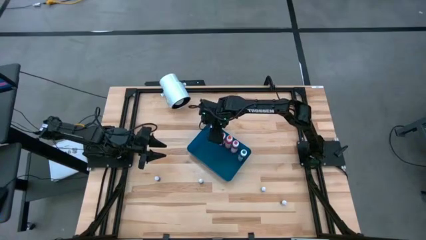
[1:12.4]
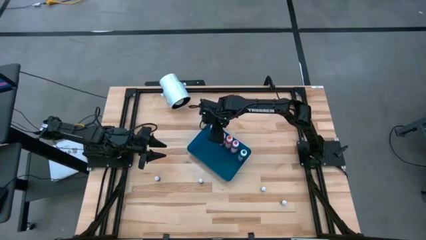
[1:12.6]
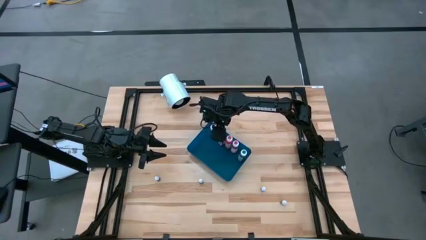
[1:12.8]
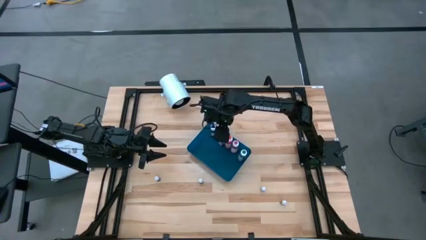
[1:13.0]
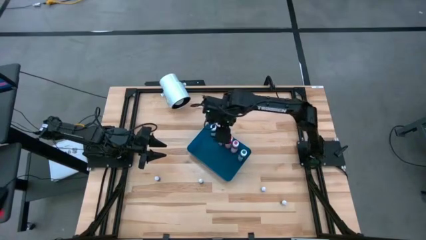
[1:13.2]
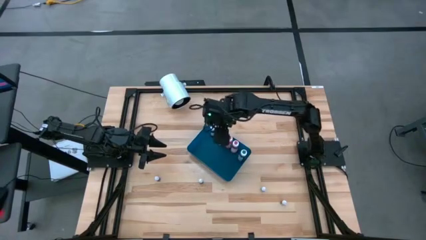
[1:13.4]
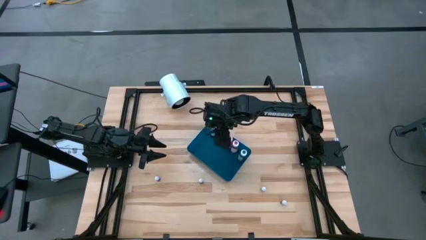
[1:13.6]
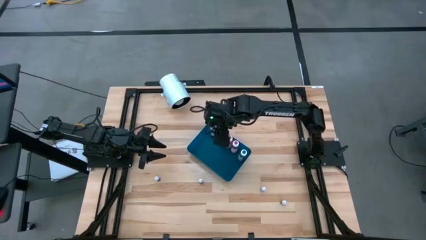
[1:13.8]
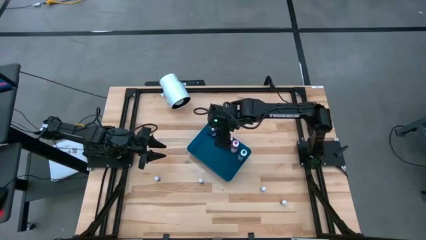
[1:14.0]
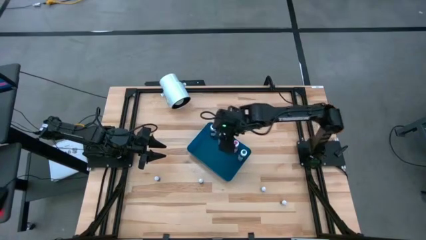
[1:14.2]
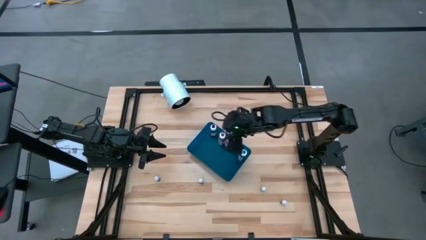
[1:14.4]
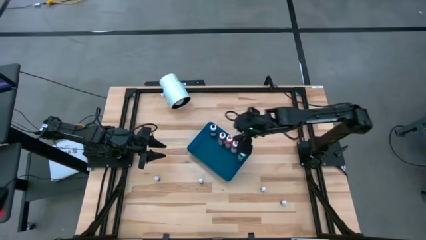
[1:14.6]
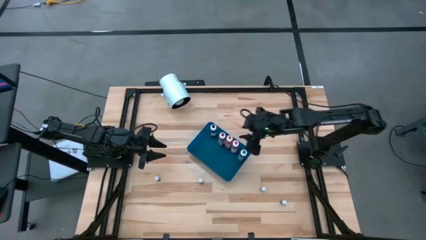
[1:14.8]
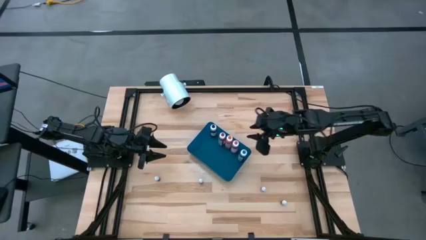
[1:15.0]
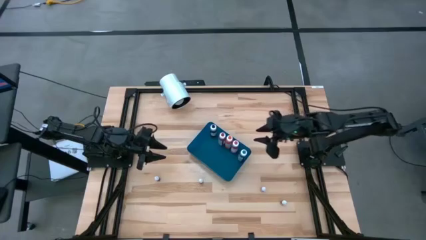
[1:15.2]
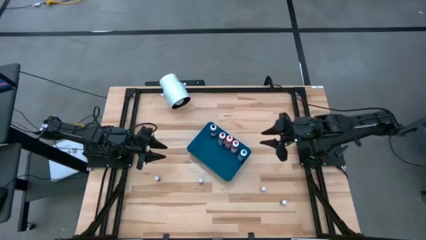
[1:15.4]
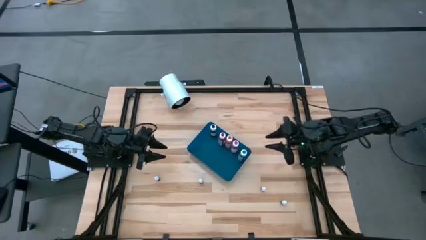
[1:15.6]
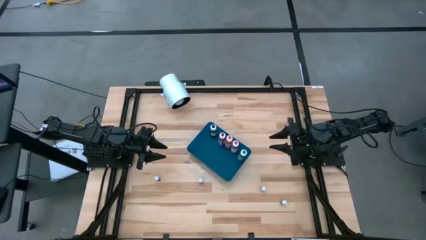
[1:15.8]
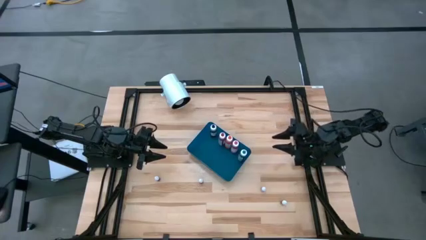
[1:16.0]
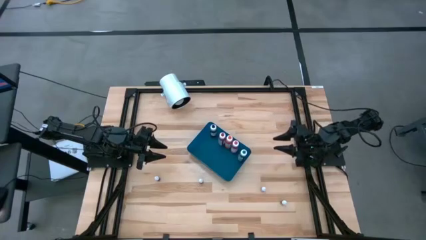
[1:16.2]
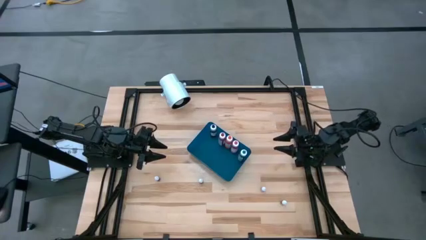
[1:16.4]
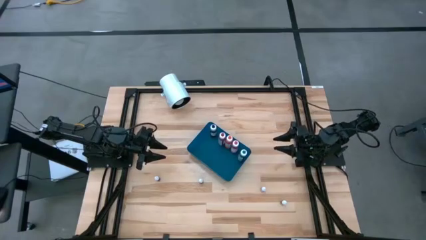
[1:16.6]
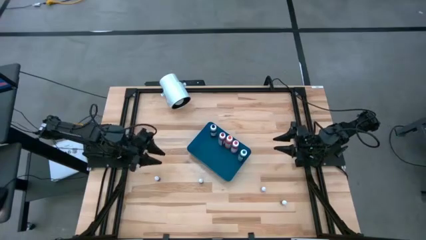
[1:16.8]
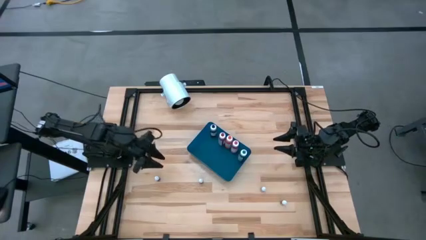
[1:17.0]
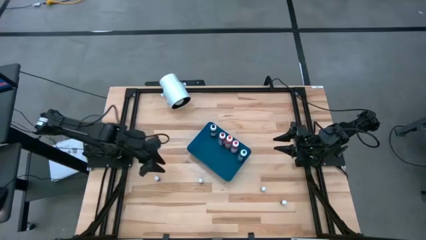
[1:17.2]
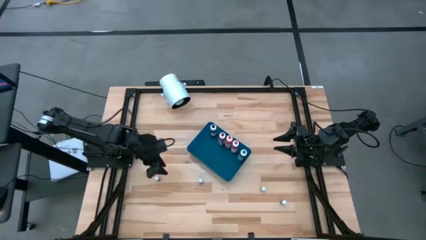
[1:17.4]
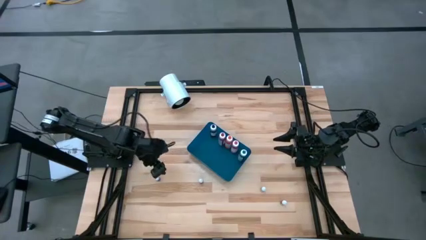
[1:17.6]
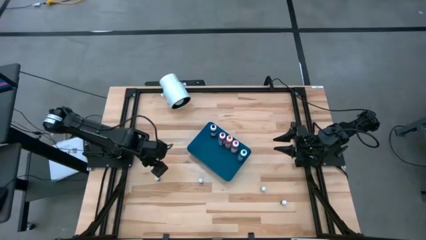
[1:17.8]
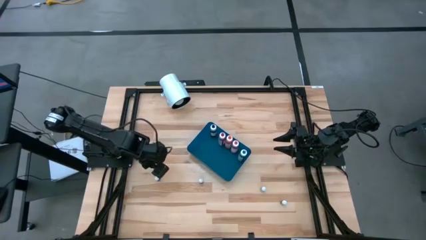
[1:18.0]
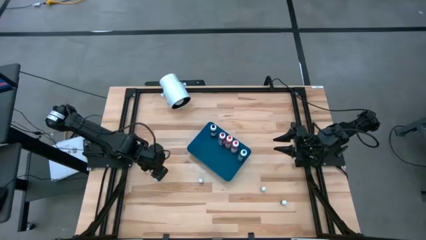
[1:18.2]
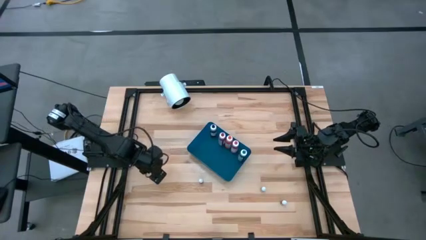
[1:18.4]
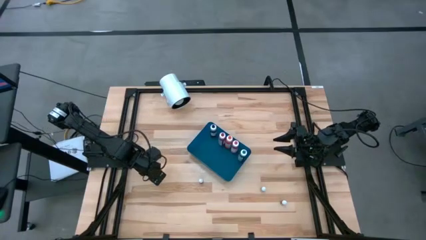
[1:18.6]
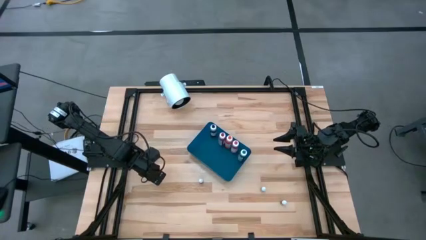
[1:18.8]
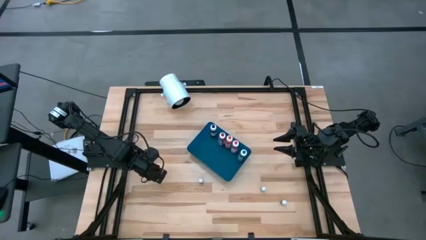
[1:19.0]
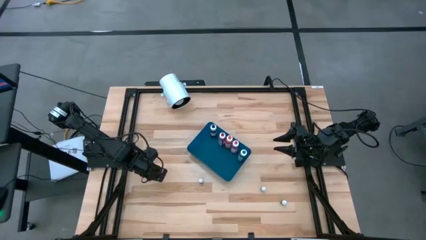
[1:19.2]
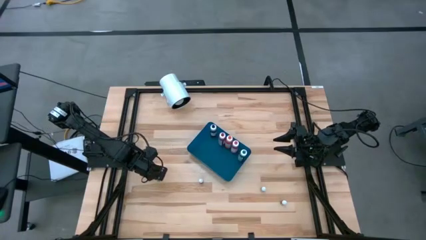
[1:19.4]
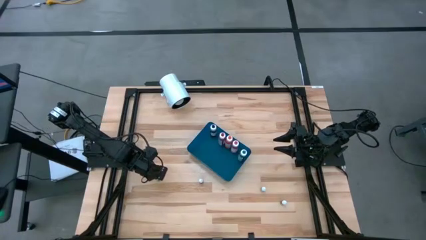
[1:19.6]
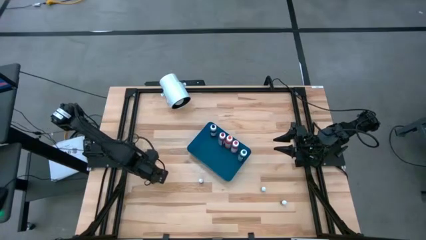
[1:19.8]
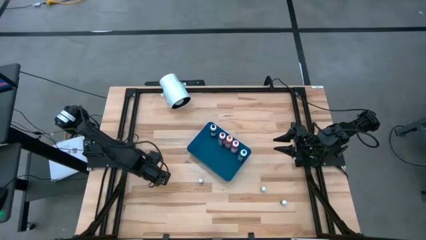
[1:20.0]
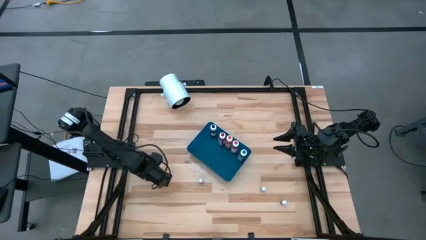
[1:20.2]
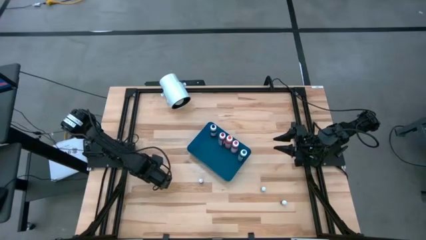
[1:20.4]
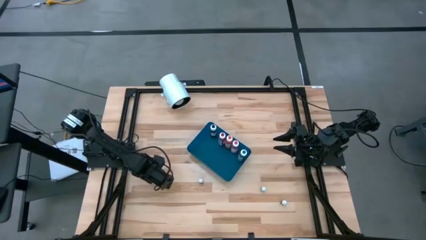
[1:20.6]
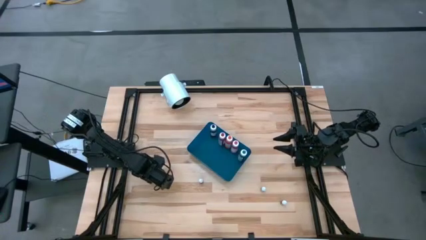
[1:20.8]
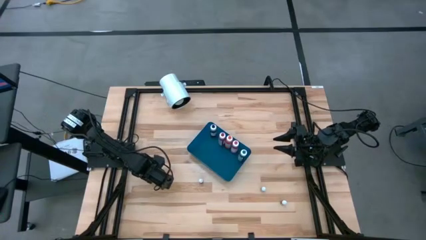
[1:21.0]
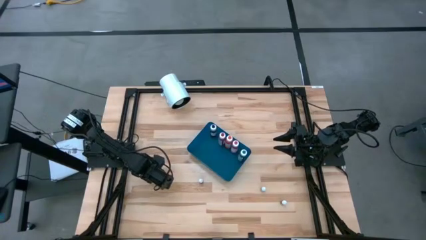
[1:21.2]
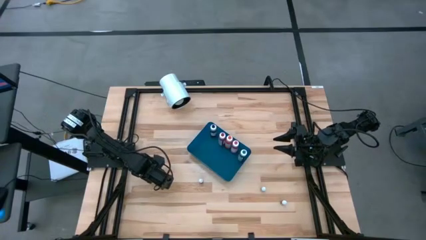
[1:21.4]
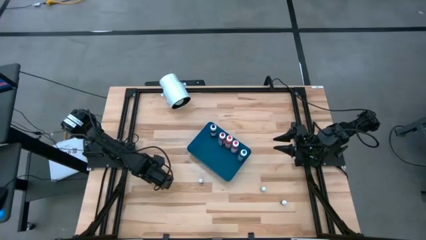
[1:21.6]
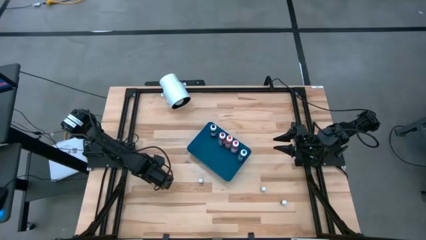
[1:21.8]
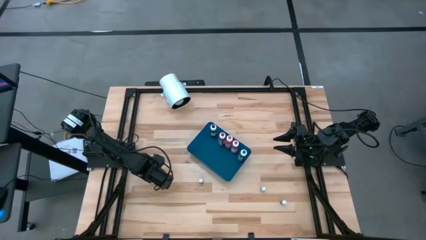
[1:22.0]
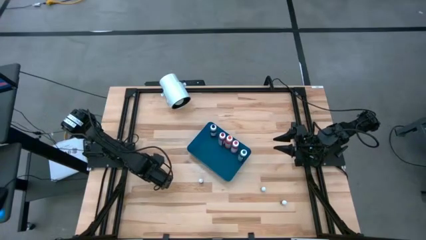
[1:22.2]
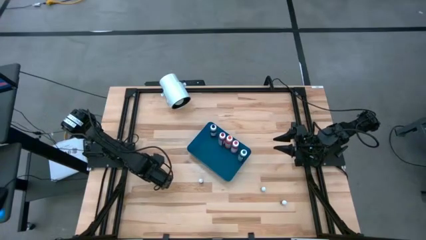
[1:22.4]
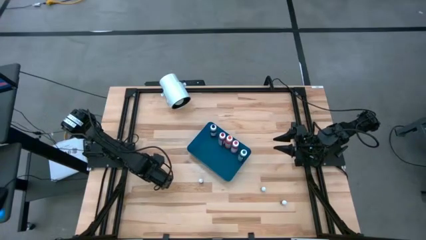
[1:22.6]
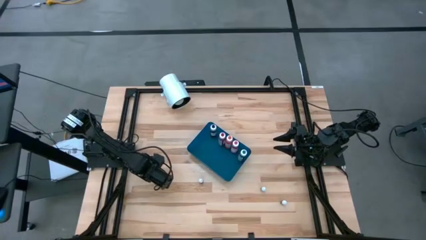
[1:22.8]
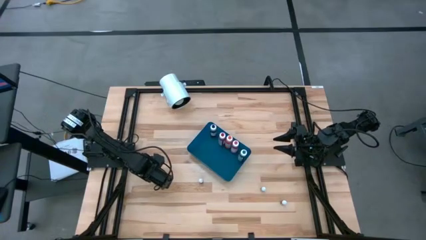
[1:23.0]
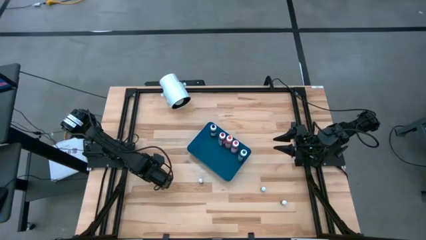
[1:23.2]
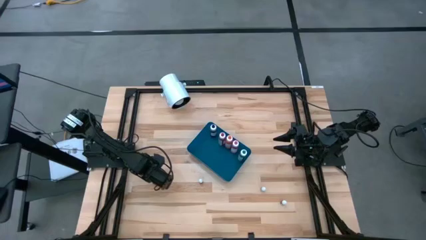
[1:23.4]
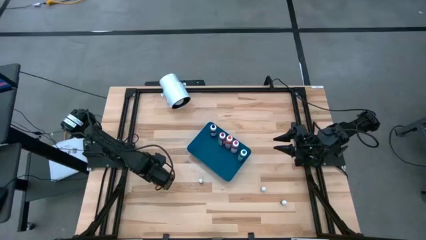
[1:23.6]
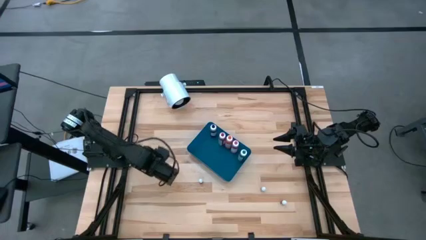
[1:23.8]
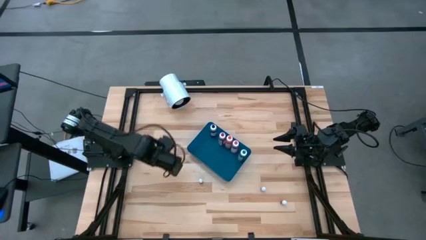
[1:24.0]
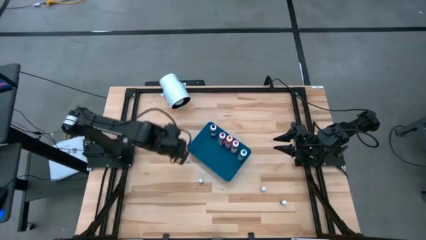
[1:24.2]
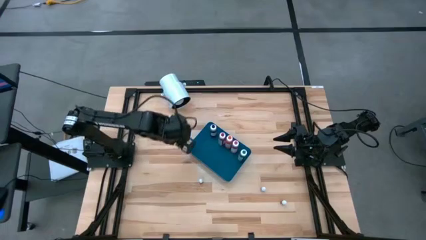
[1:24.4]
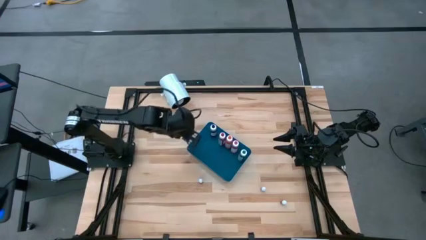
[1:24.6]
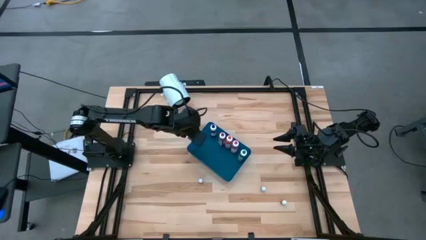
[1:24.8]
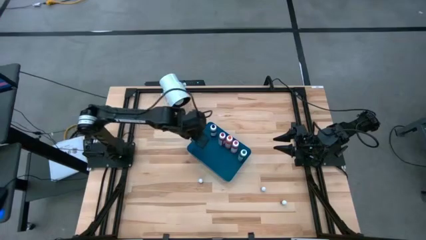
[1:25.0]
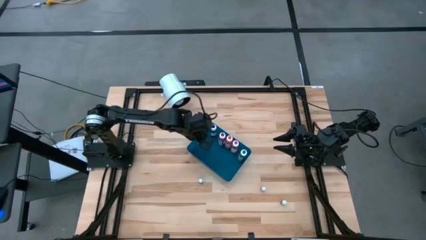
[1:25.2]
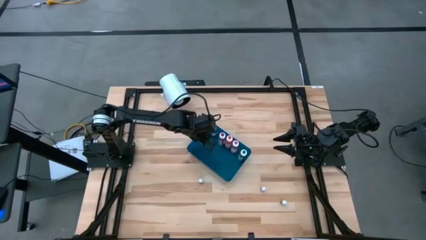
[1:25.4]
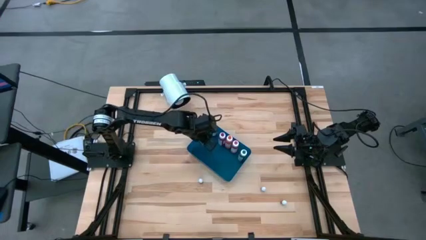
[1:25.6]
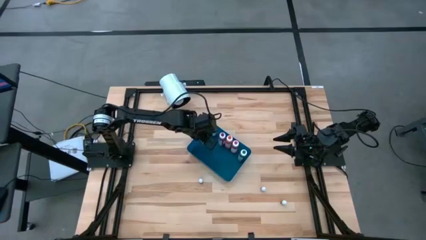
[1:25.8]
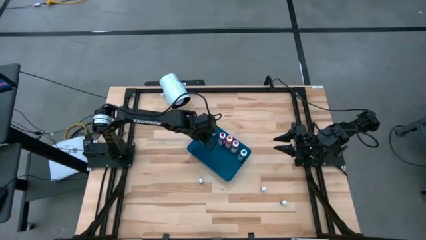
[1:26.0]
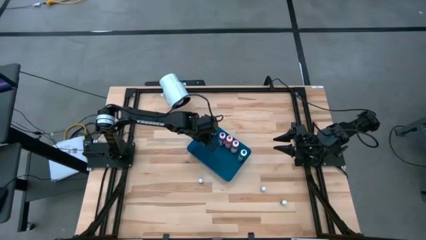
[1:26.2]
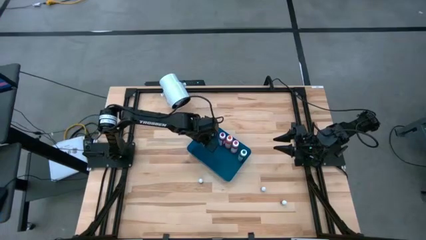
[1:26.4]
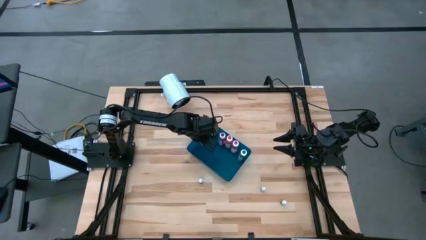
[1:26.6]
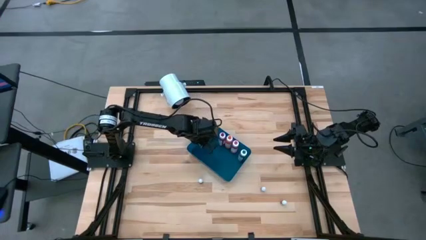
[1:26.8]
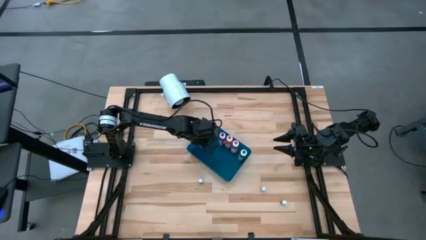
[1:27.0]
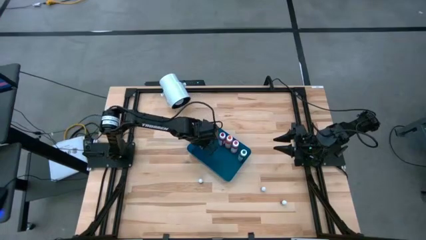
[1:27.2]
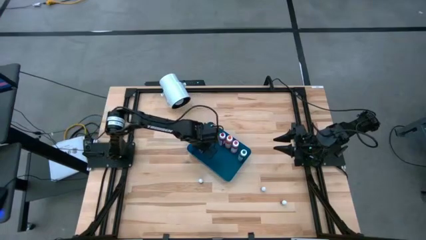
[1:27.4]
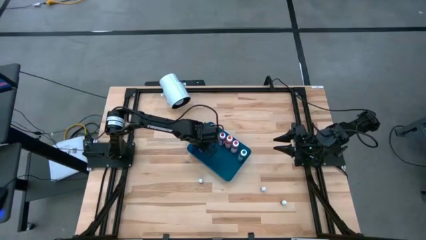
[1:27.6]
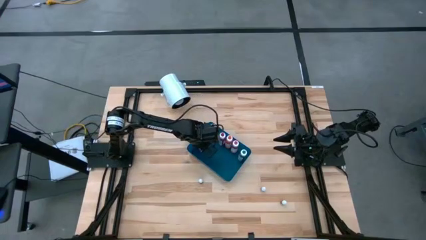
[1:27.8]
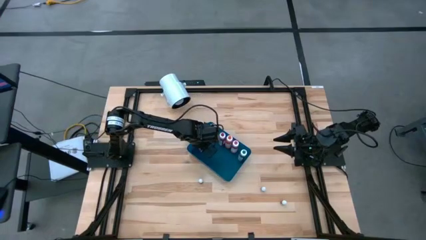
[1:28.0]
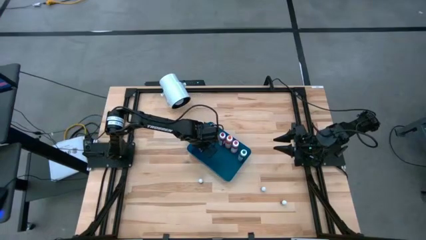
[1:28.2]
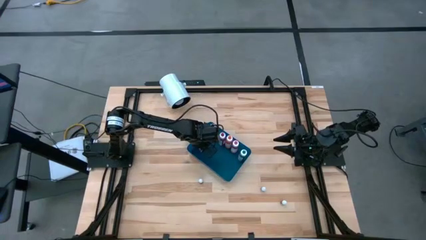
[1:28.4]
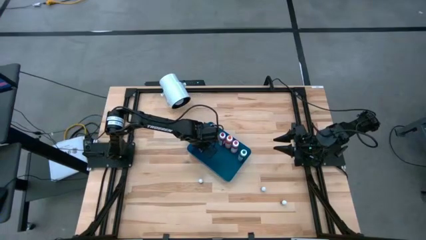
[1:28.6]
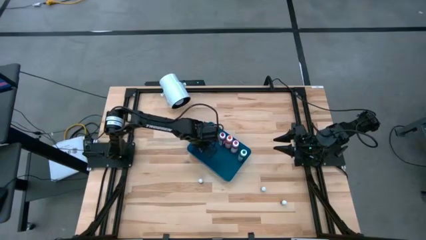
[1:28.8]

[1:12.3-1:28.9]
Task: Pick & Place food coloring
Put the left small green food coloring bottle into the blue bin
